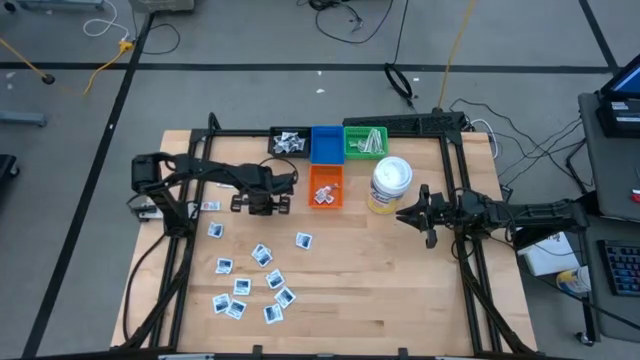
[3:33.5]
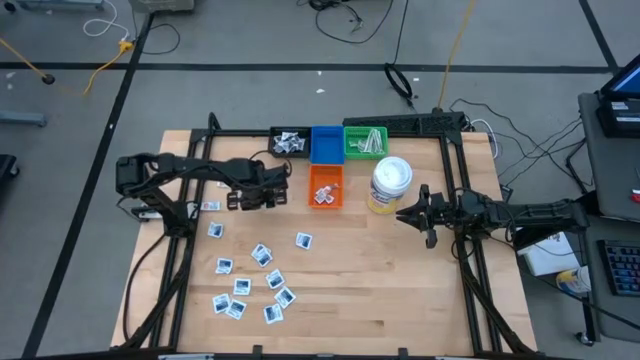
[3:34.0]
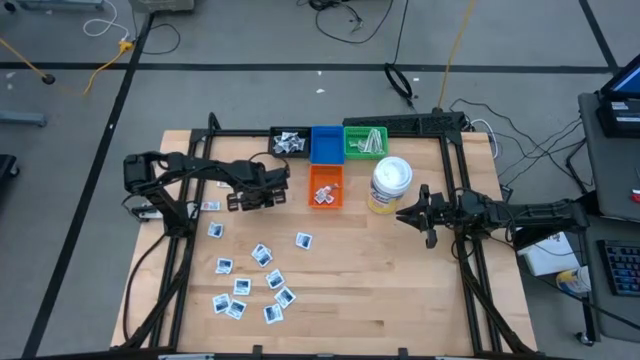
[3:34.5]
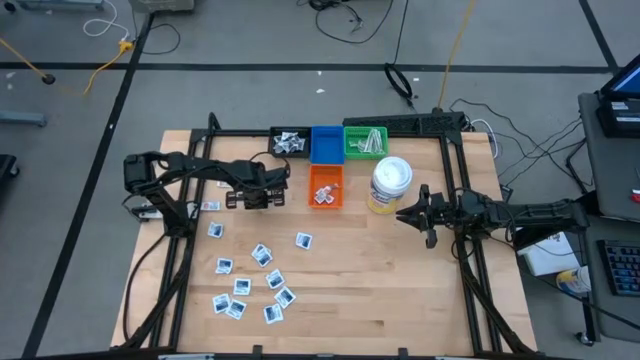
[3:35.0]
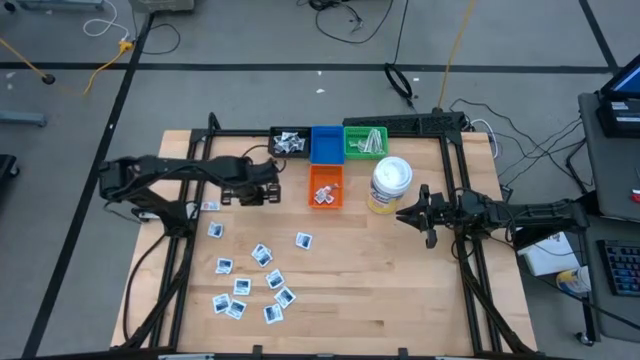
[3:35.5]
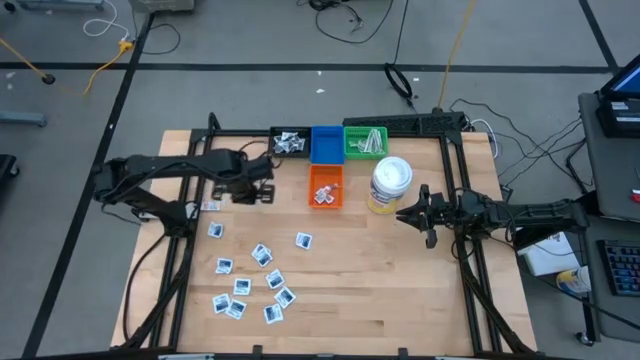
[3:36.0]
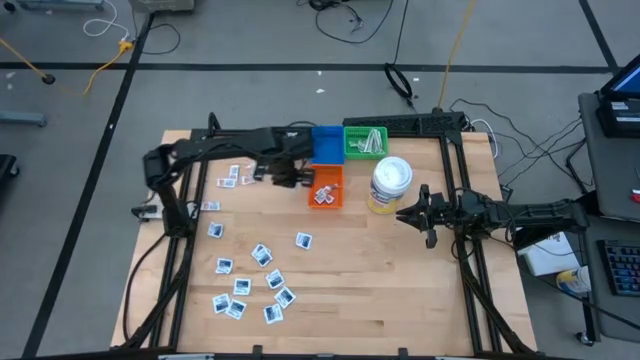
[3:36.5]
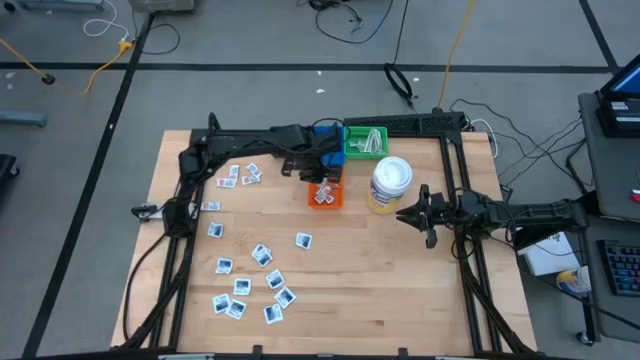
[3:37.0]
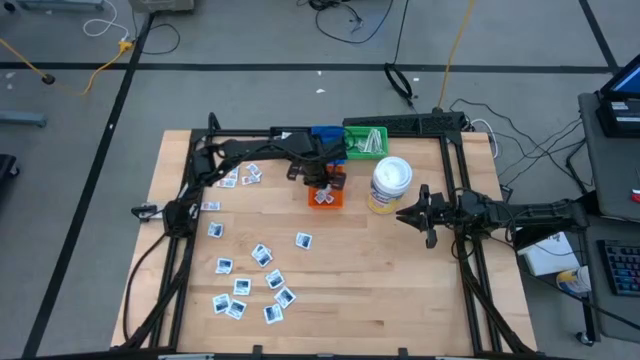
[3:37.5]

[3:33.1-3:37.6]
Task: Pick & Place First Aid Supplies
Put the orange ointment pack into the orange bin

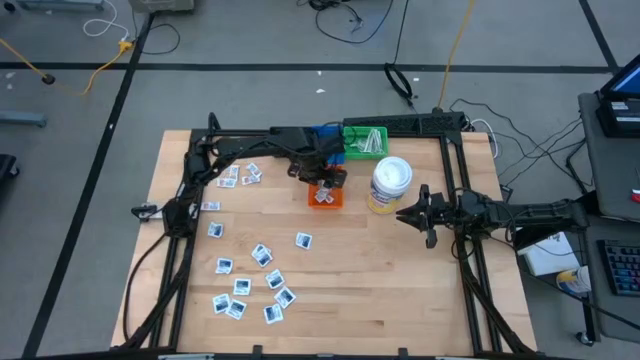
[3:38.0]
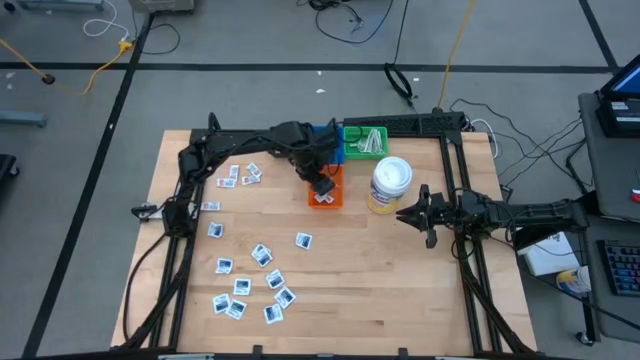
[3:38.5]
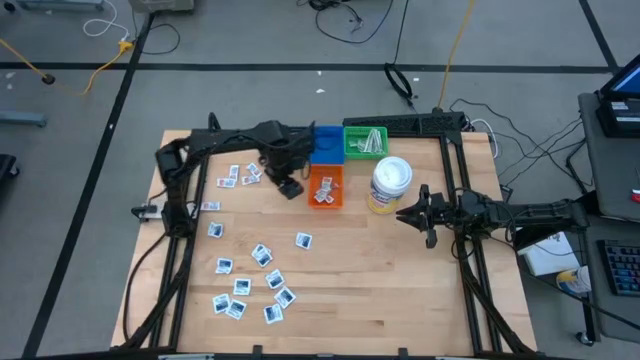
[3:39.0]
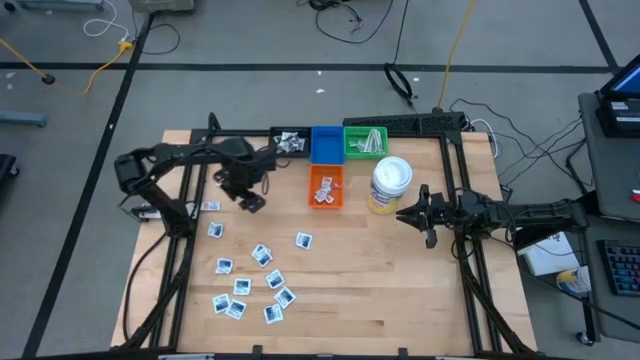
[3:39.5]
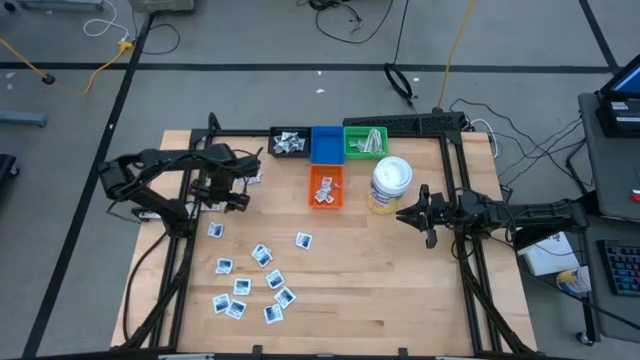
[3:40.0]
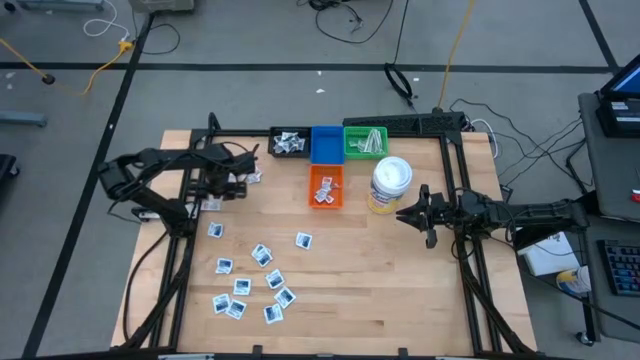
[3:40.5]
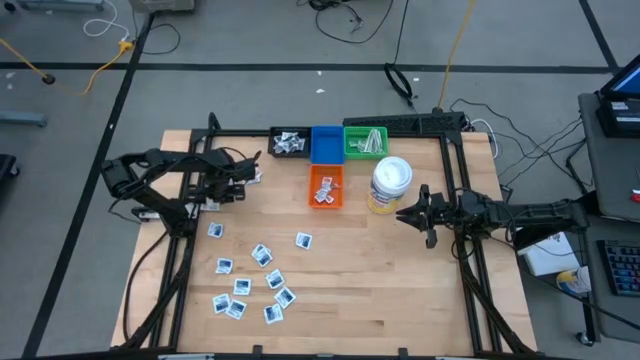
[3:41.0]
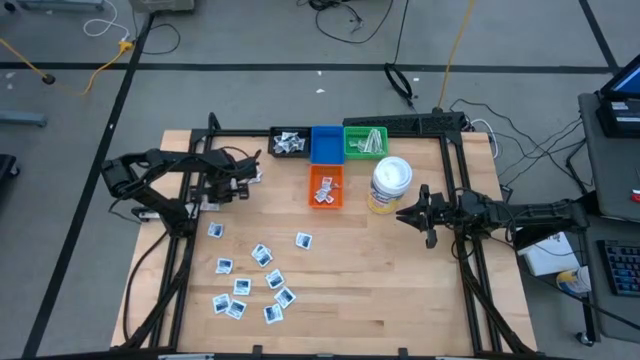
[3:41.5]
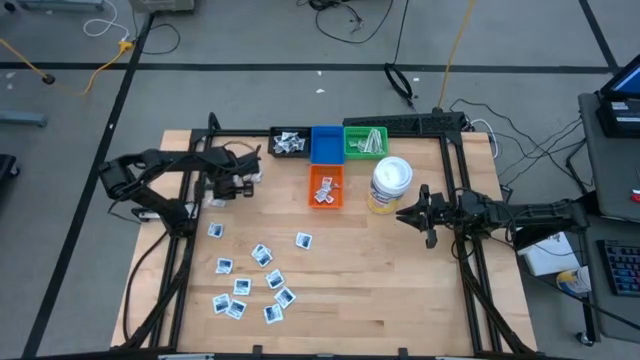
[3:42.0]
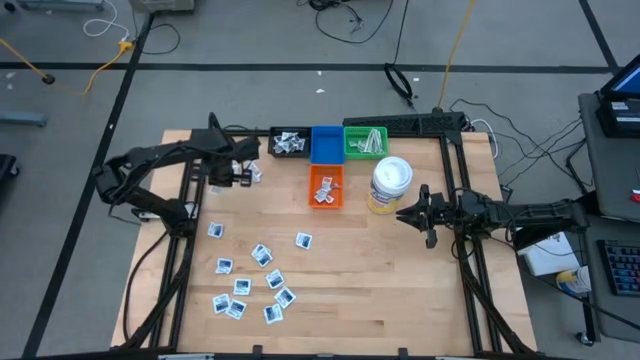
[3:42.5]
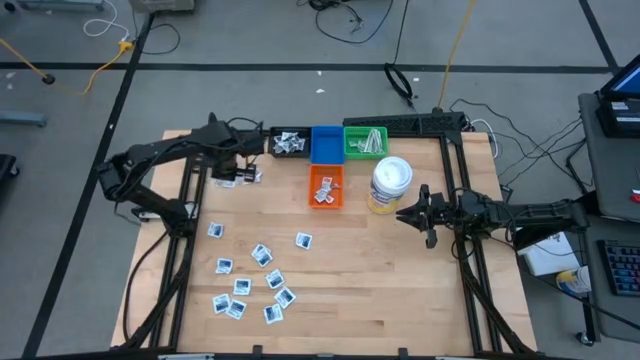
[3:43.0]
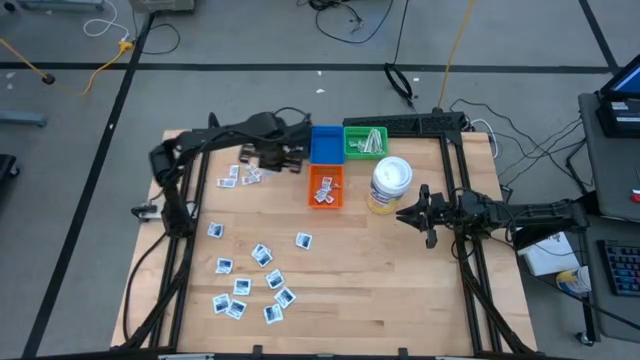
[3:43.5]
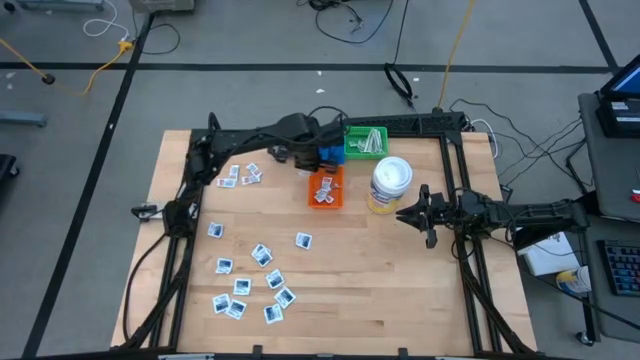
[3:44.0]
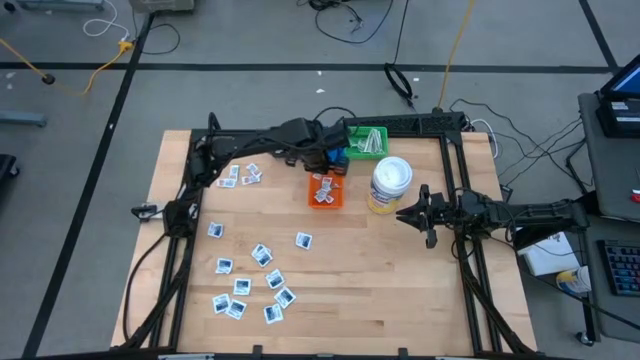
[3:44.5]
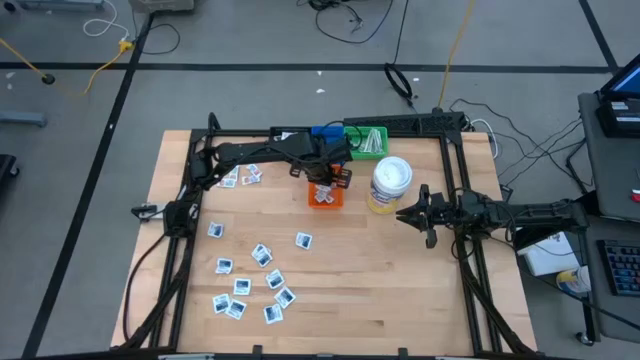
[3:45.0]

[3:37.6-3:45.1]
Put the orange ointment pack into the orange bin

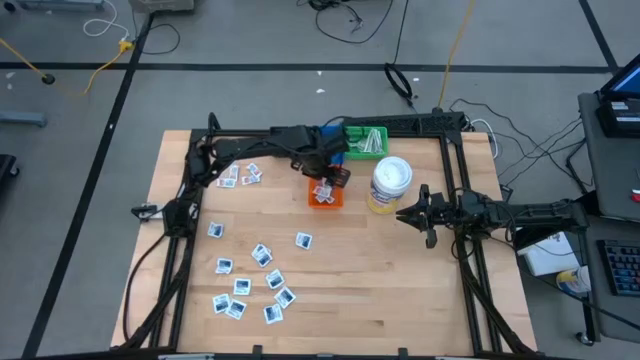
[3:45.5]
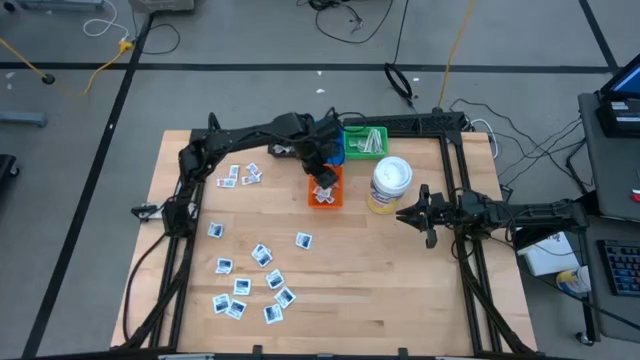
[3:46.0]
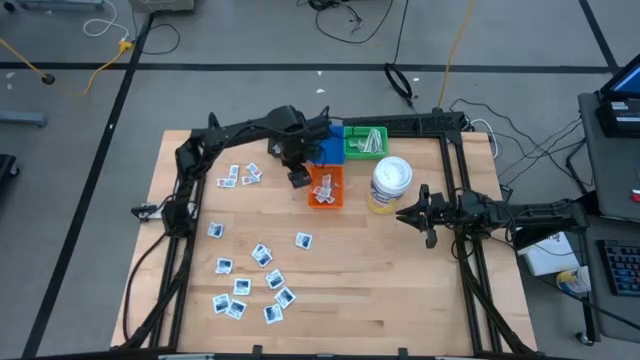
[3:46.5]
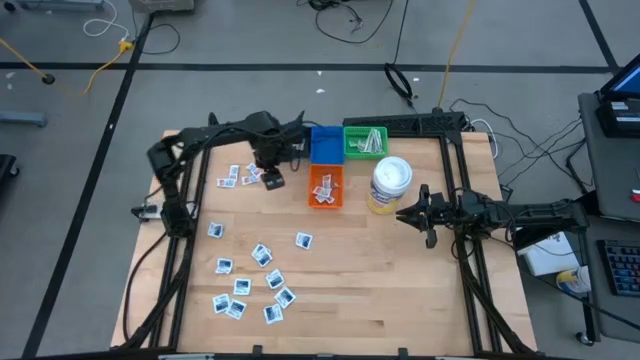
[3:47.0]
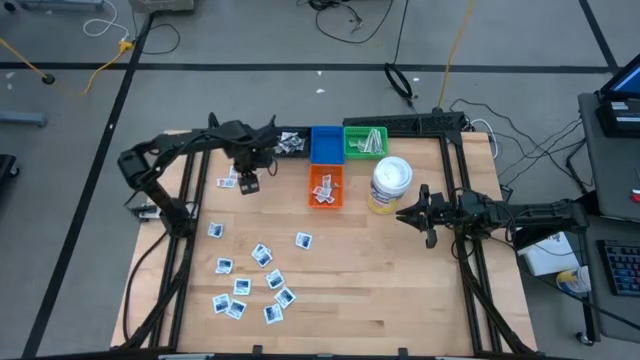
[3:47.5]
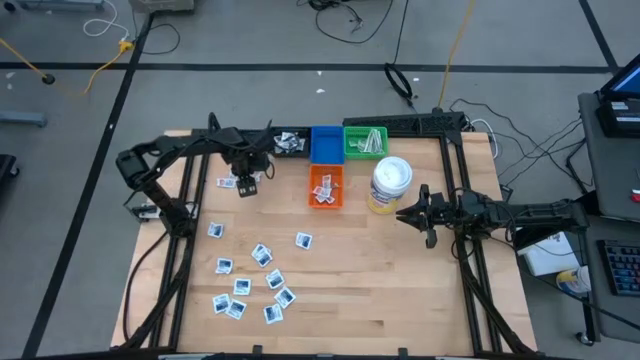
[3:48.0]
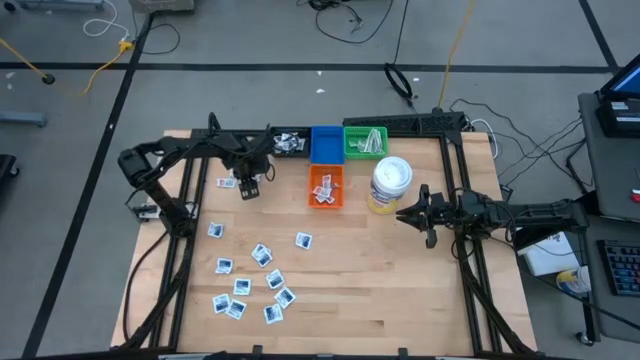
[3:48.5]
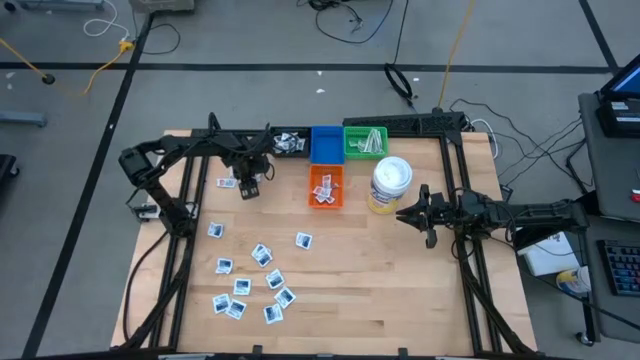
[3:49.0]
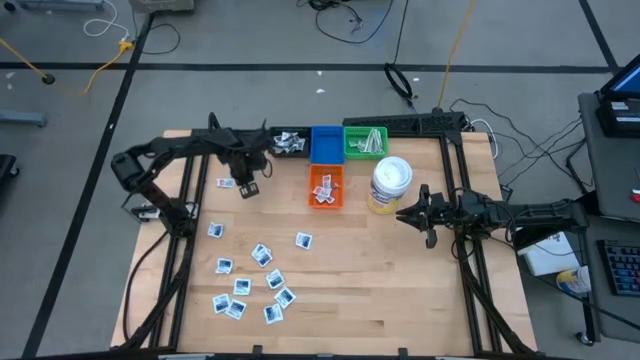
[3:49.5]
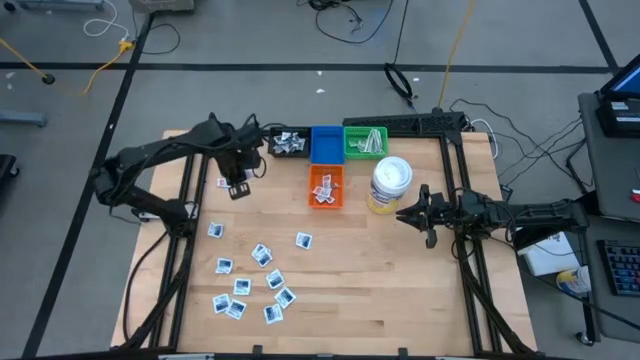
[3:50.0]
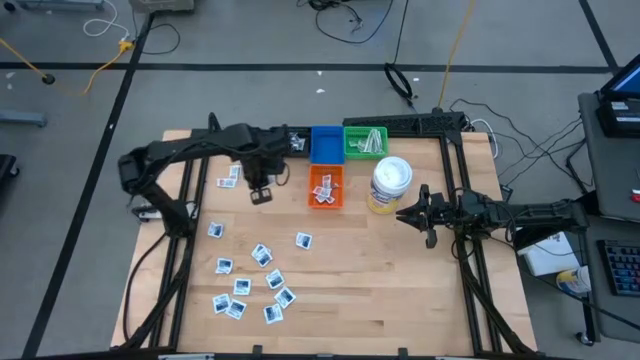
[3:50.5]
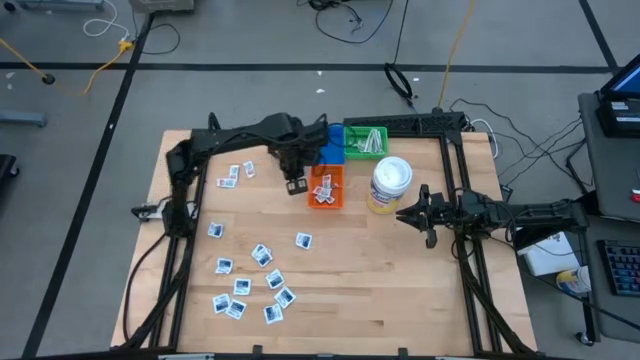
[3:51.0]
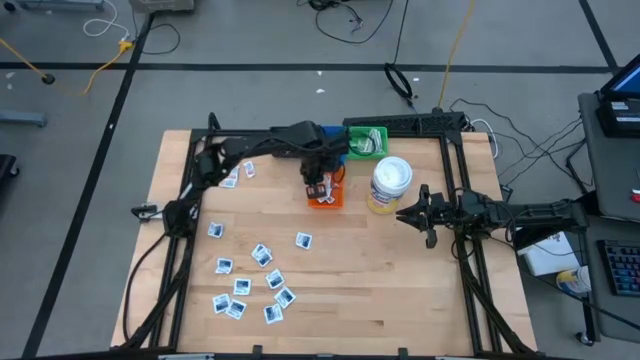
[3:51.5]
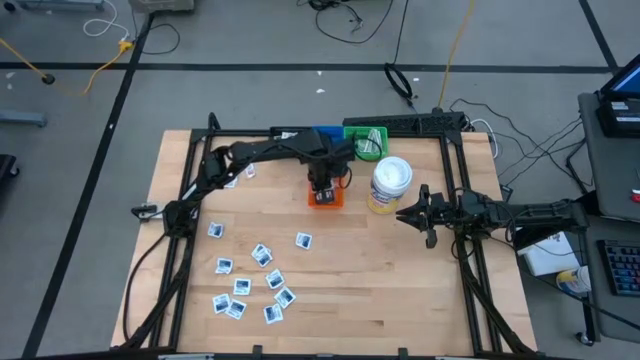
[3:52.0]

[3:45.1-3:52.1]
Put the orange ointment pack into the orange bin

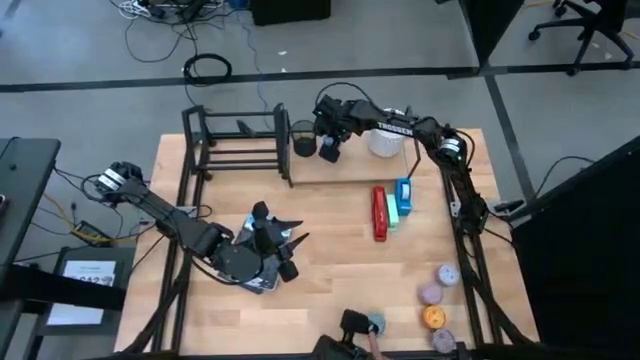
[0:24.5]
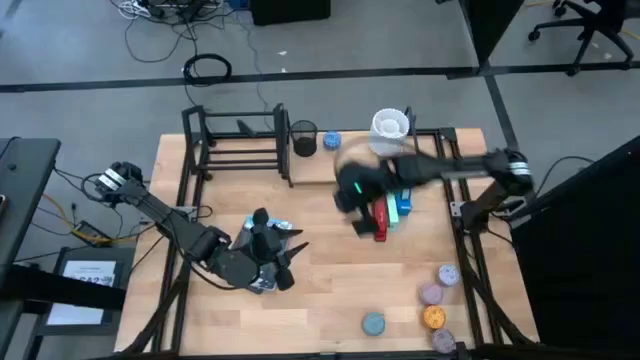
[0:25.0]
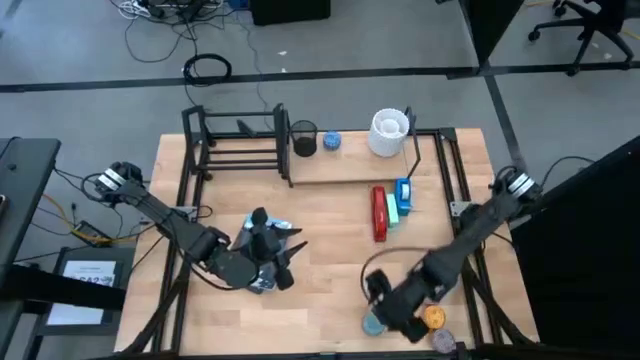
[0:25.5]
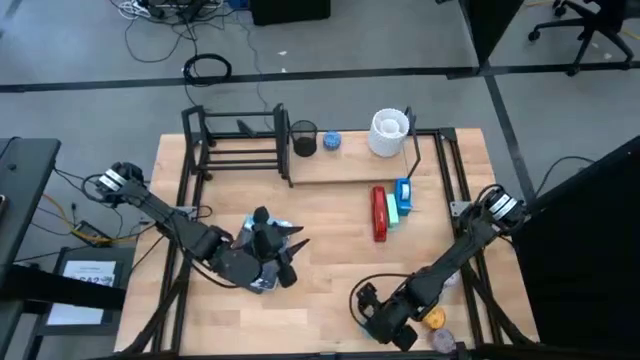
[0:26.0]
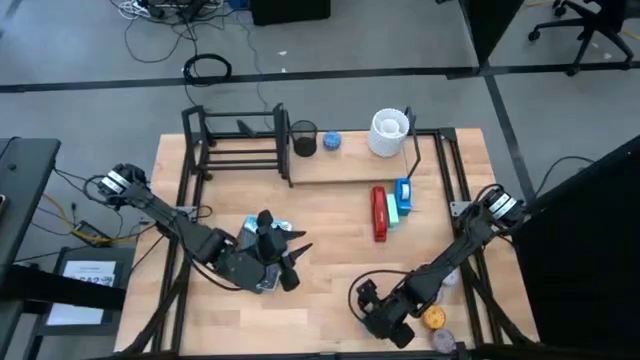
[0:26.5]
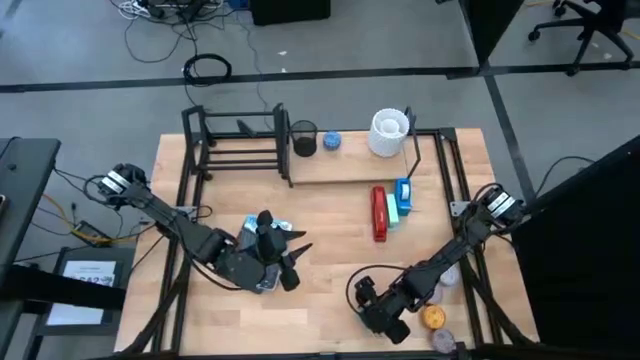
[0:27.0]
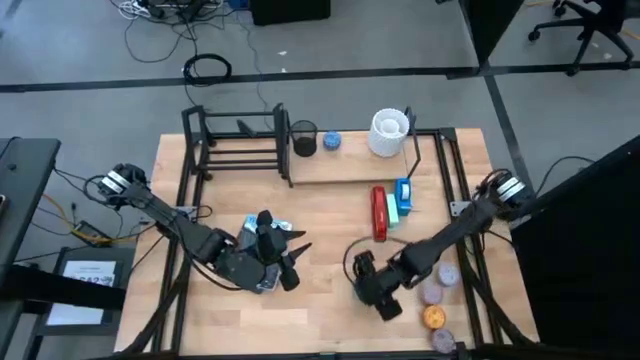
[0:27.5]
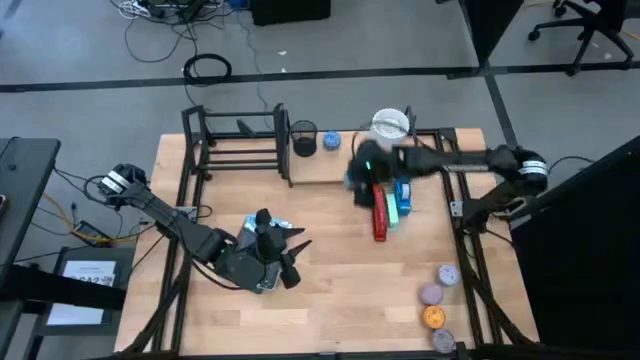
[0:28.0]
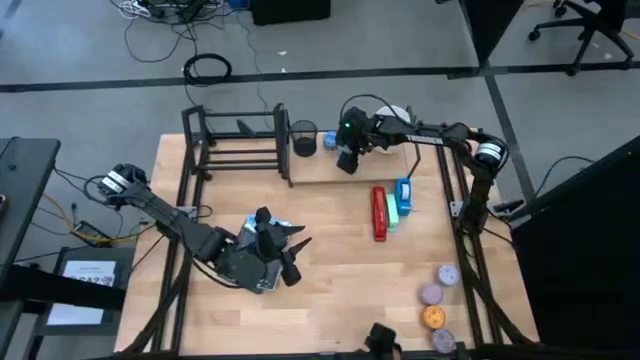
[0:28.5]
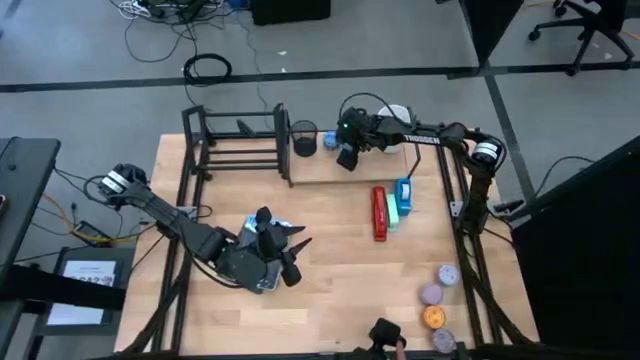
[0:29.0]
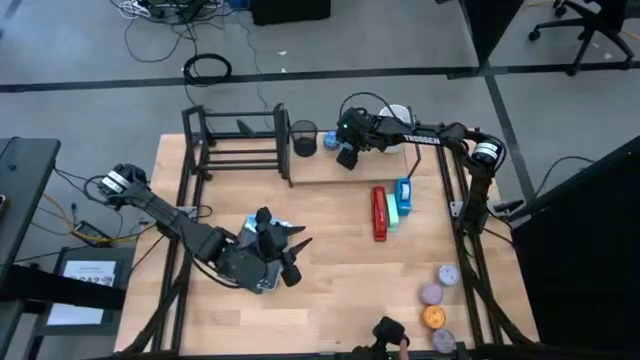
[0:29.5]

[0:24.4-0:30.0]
Task: Stock shelves
Put the green scented candle on the shelf
